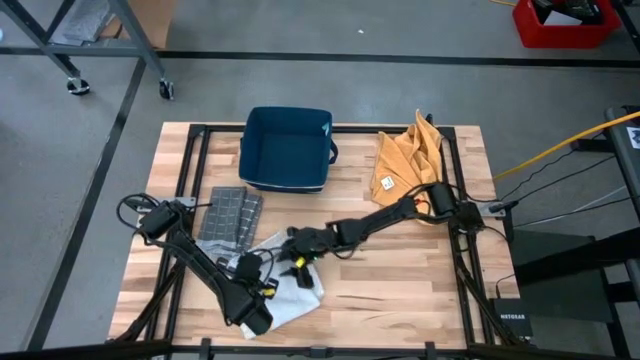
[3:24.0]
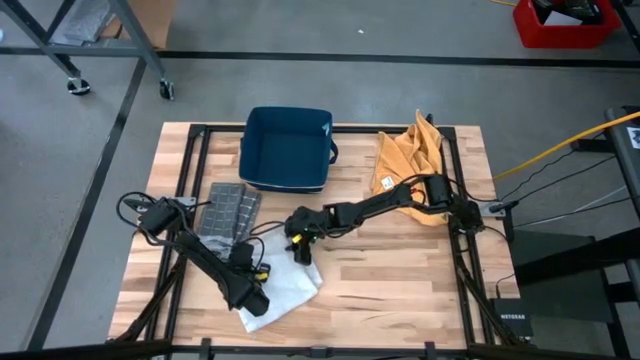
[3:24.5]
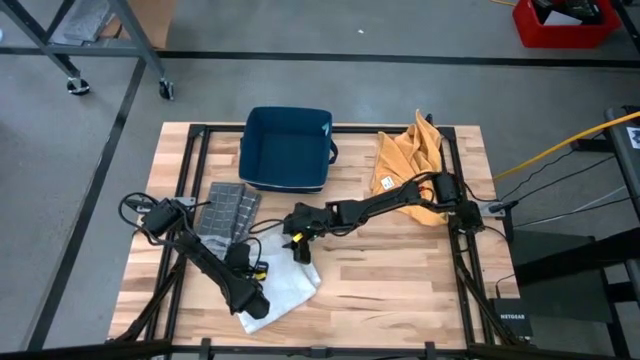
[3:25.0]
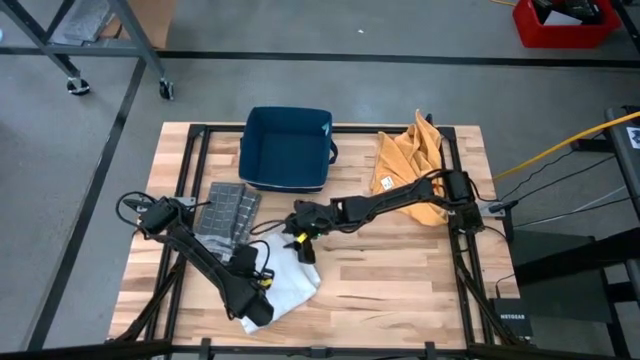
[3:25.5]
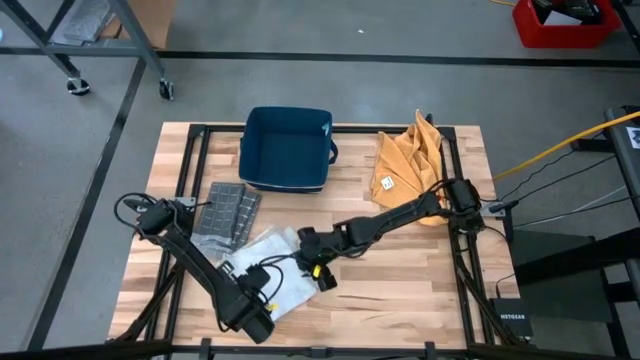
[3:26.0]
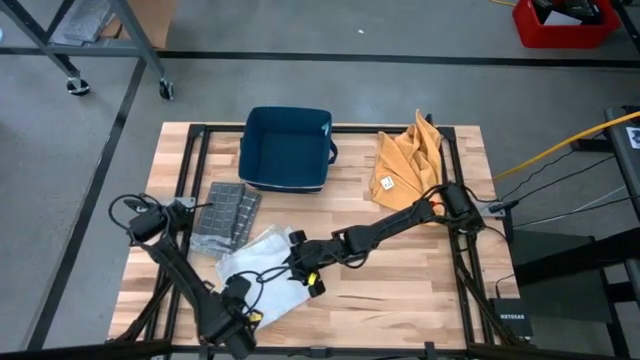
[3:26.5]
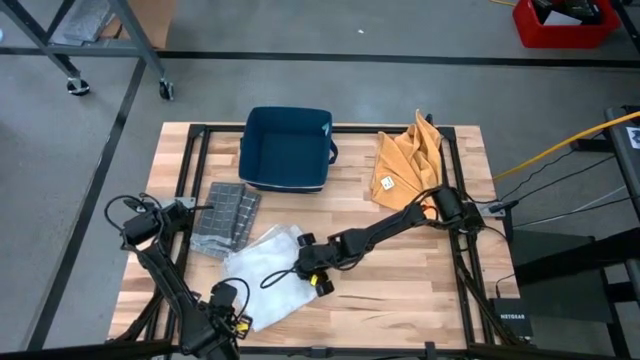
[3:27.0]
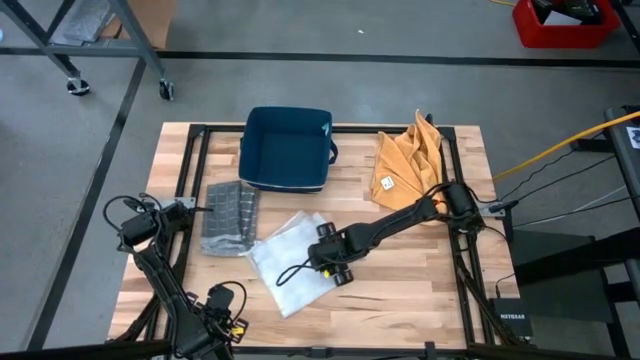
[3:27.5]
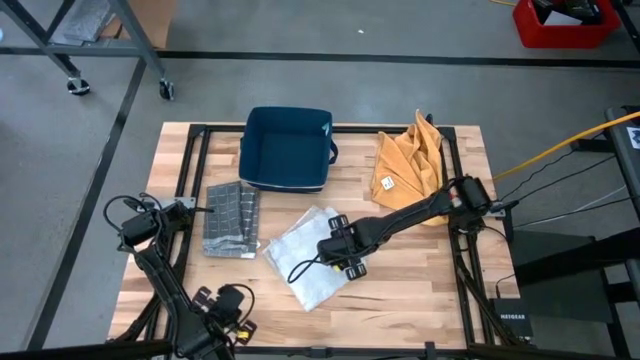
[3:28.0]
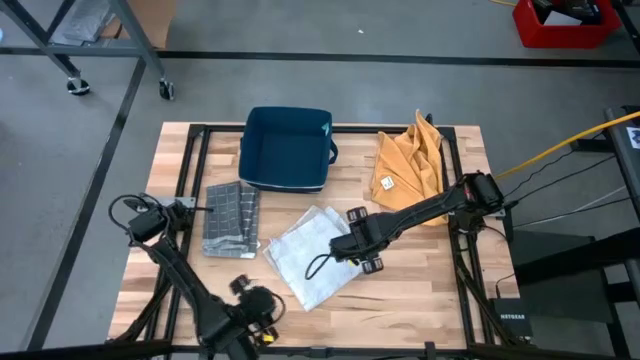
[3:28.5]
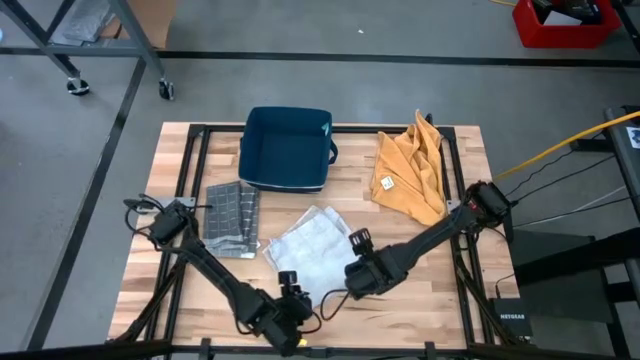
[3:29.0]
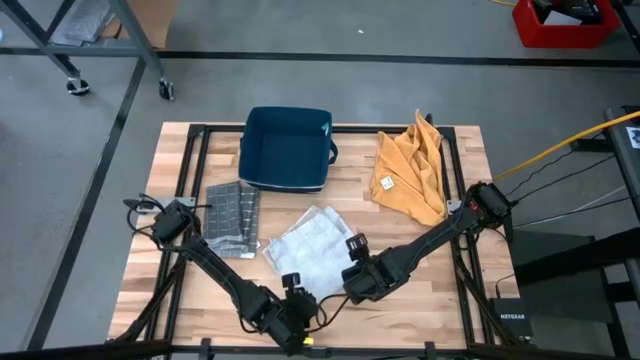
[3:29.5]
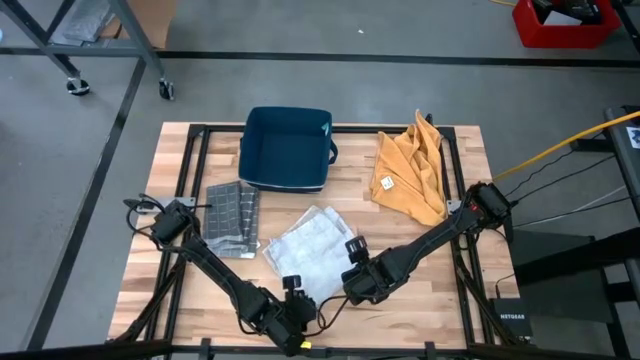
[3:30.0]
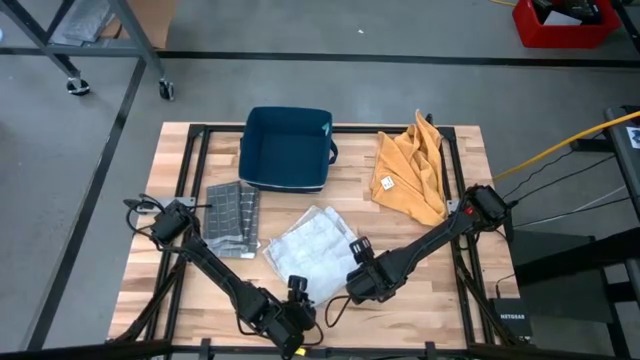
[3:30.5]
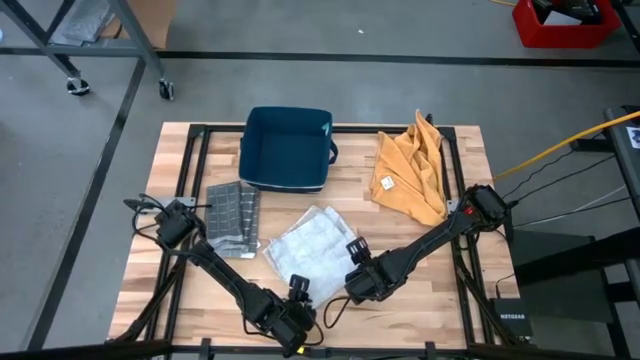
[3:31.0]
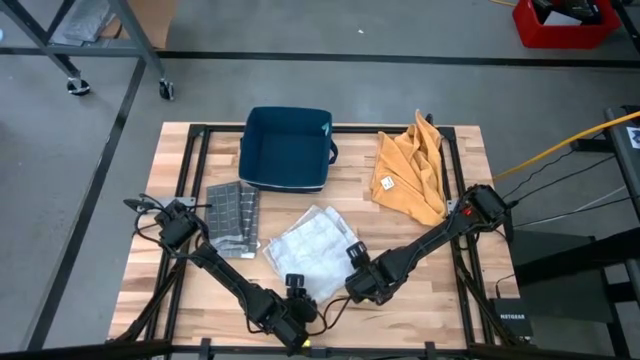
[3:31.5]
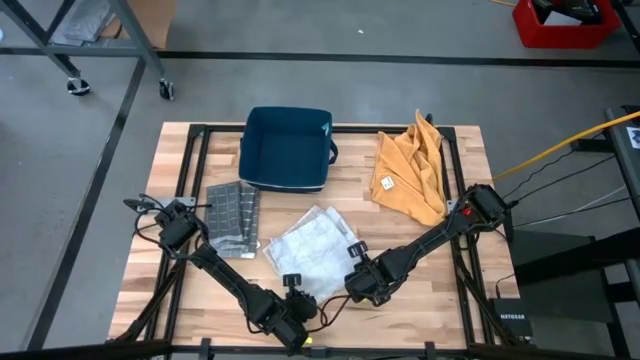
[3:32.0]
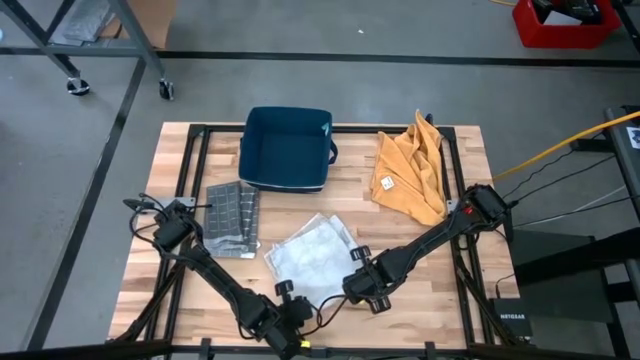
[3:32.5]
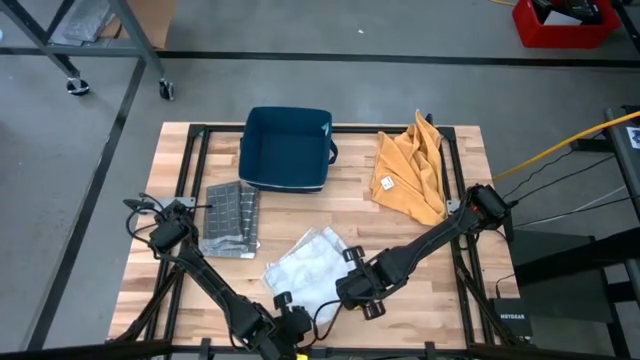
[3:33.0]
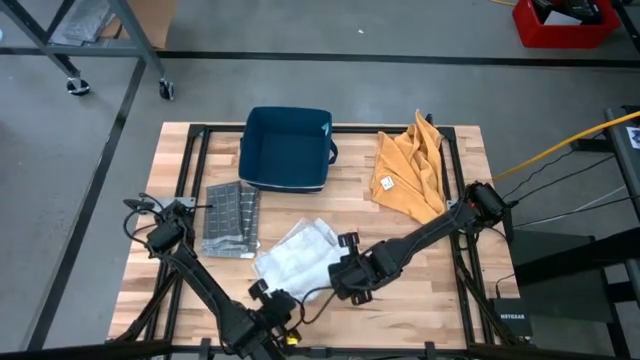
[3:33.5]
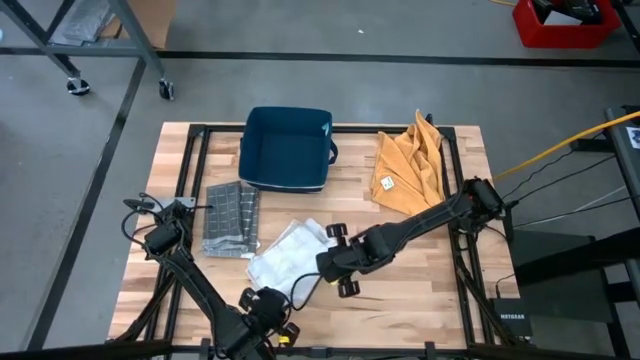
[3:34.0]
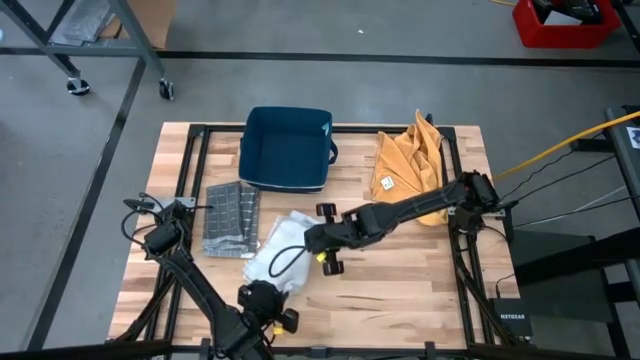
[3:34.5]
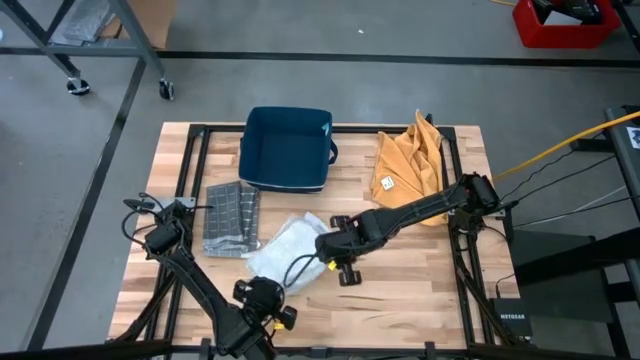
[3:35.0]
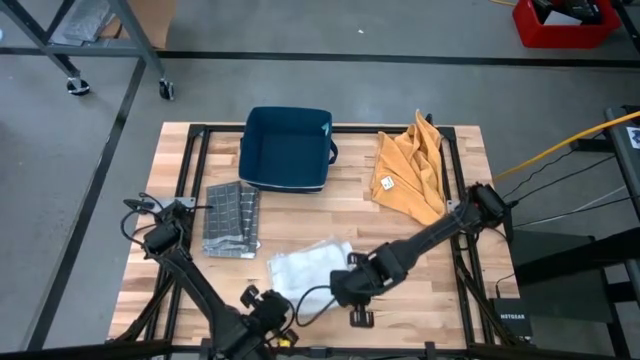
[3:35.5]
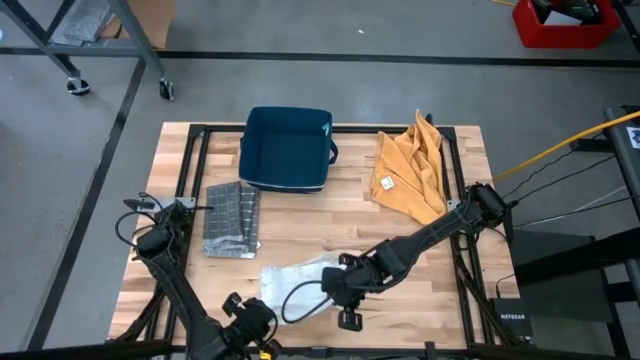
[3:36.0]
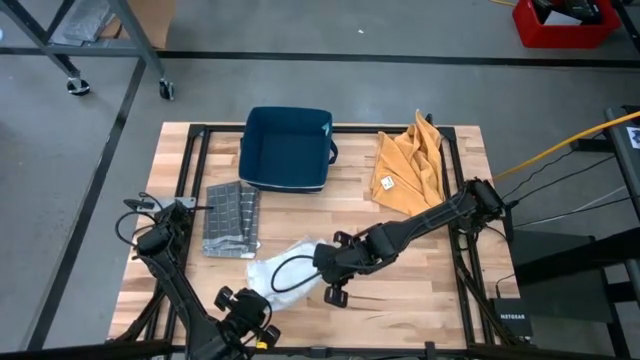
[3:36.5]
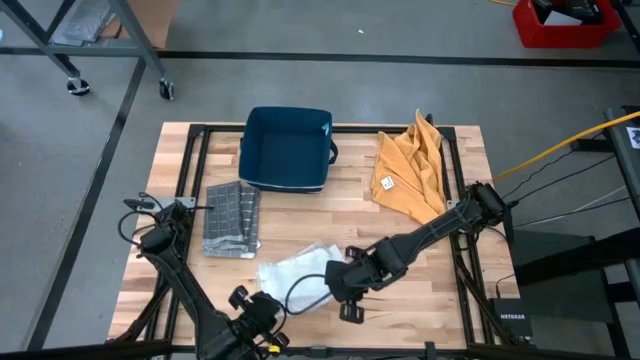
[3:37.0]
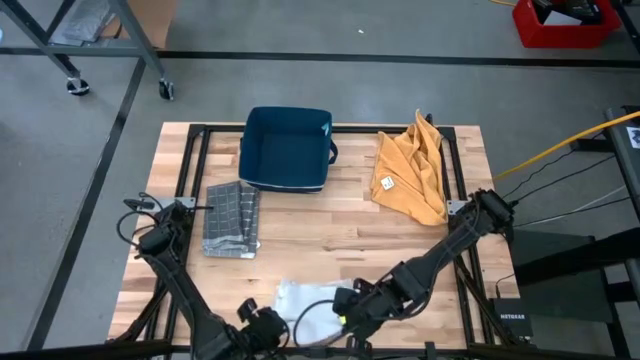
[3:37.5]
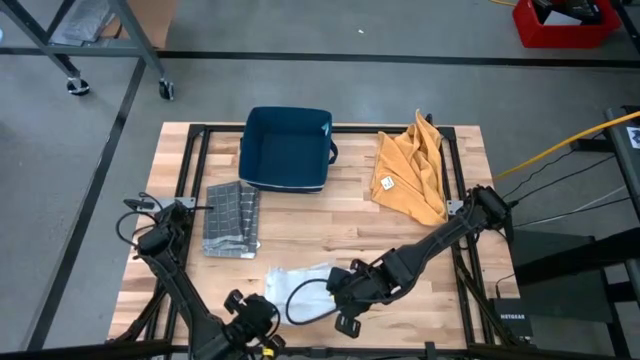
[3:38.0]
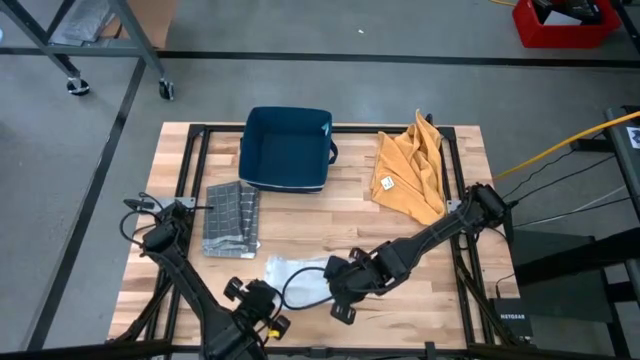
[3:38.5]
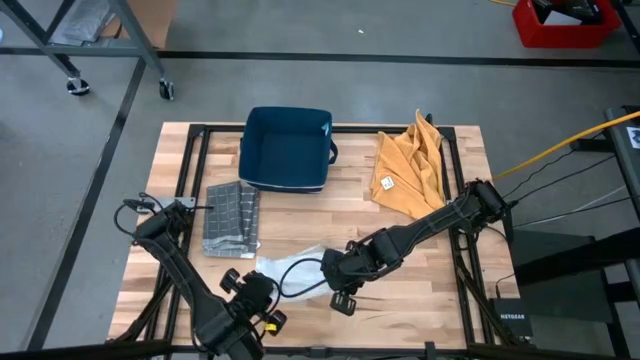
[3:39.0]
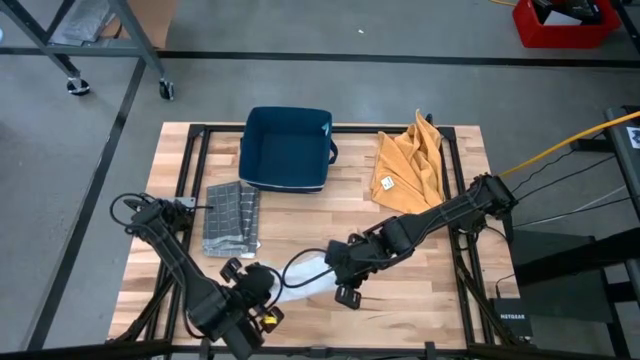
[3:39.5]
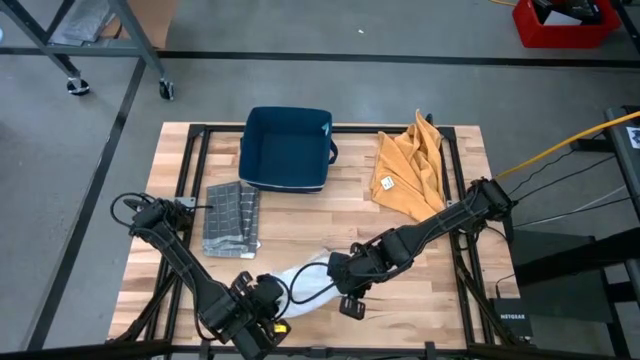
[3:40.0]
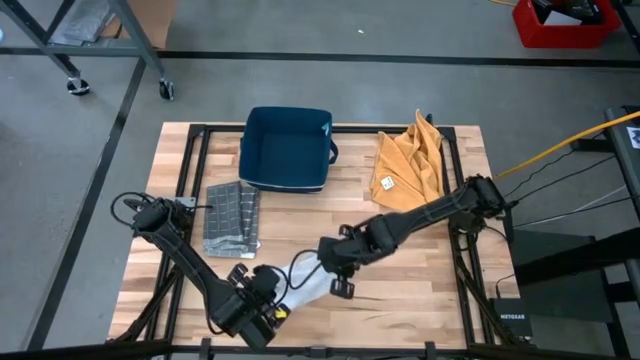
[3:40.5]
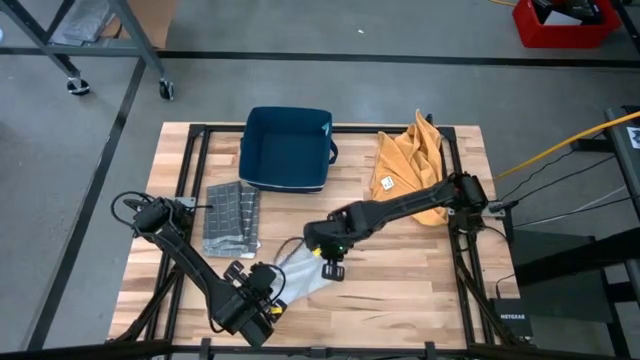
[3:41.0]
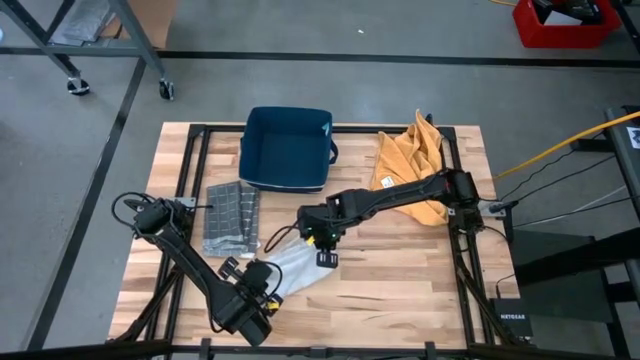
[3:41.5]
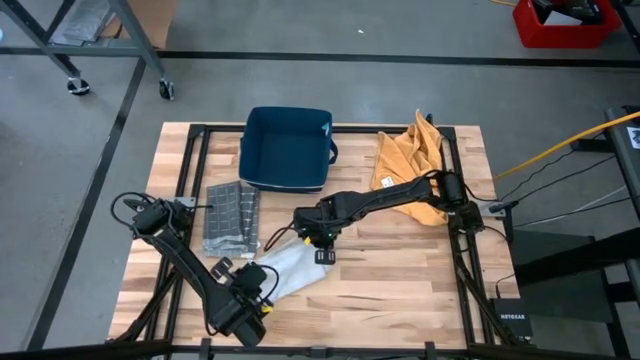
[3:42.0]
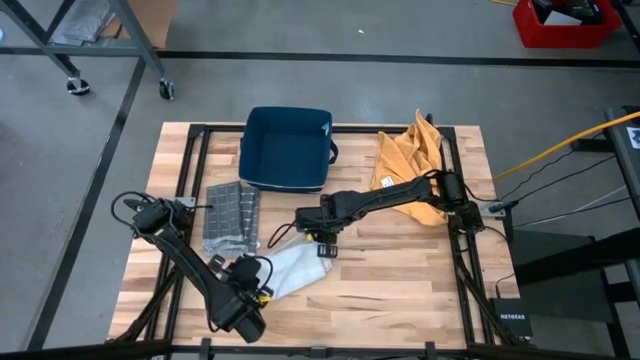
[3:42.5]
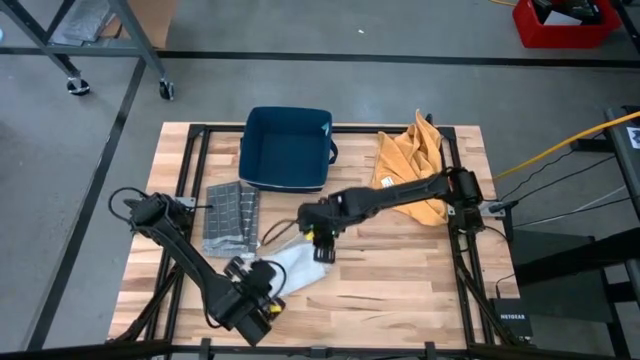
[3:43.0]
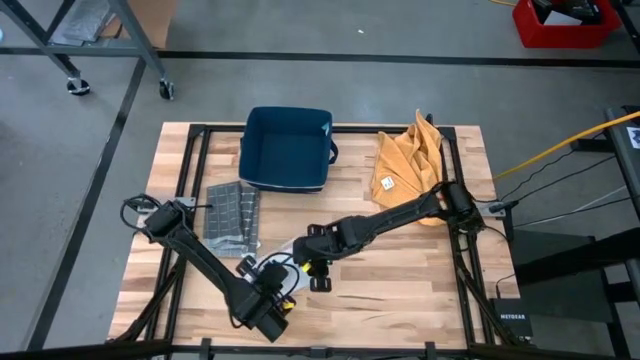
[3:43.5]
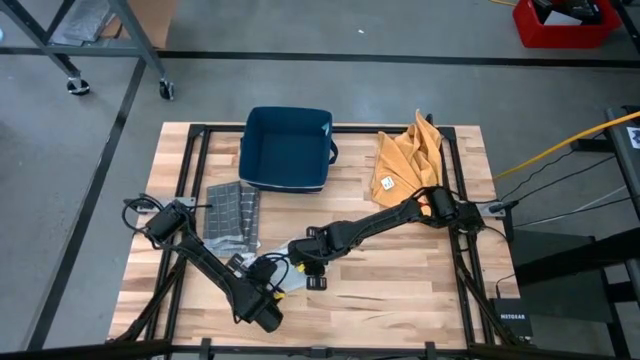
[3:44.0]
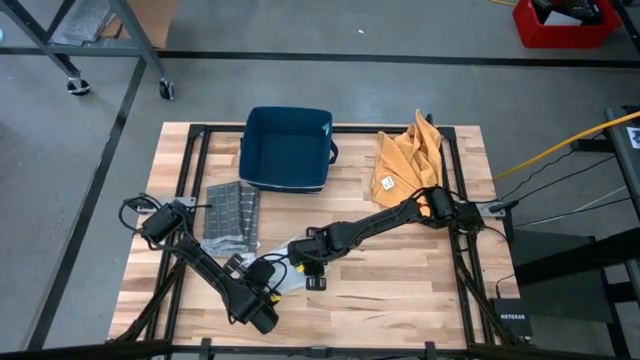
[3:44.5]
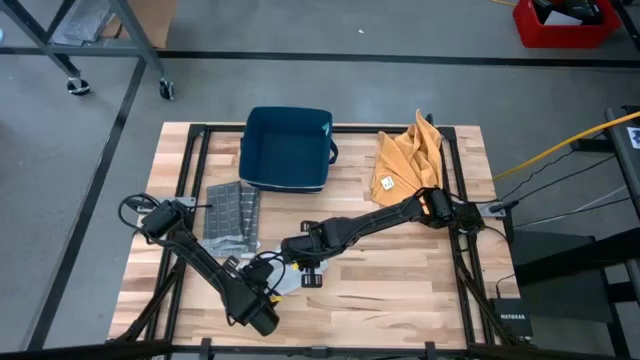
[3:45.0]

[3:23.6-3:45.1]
Task: Fold towel
Fold the white patterned towel
